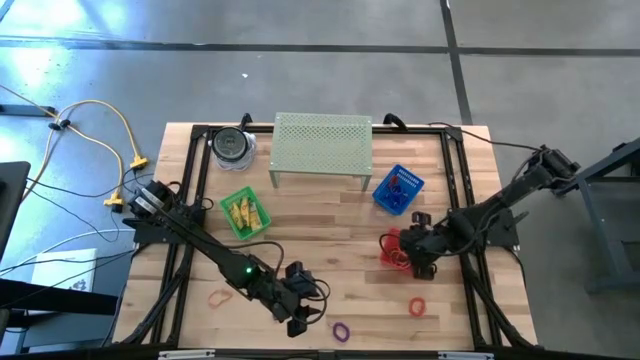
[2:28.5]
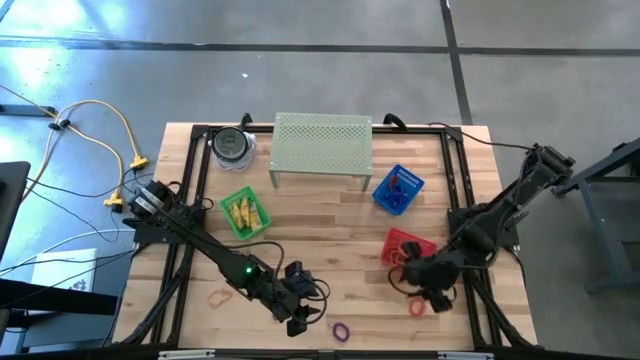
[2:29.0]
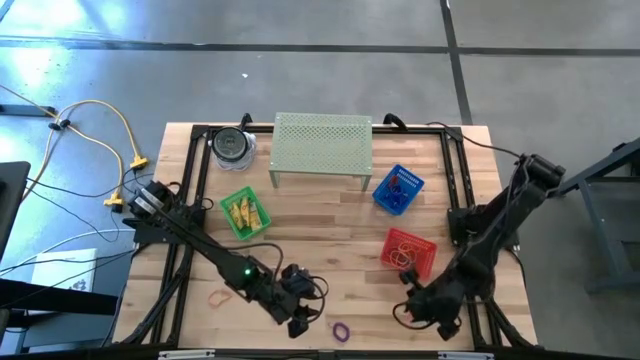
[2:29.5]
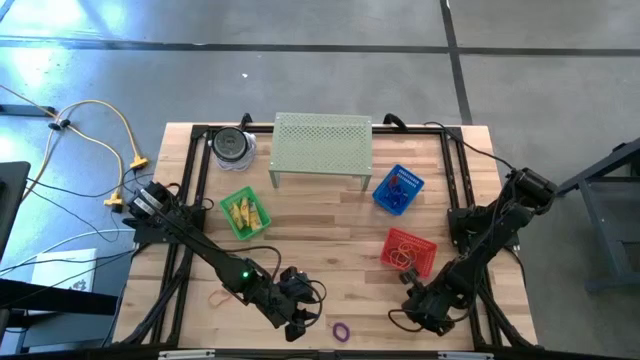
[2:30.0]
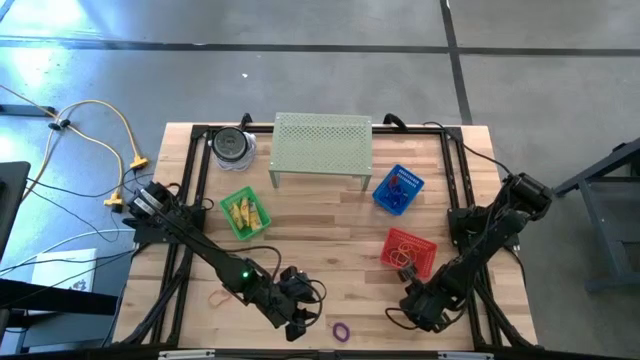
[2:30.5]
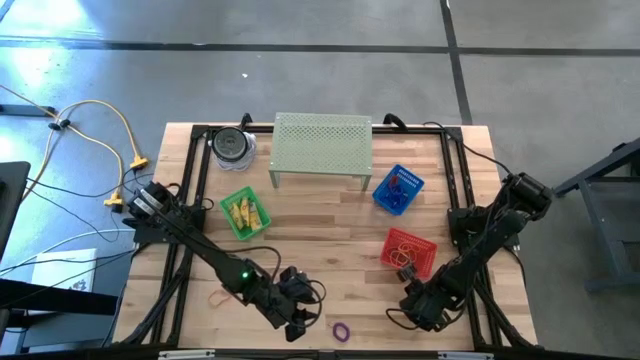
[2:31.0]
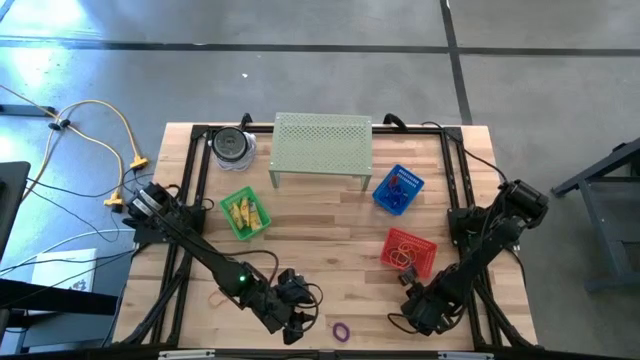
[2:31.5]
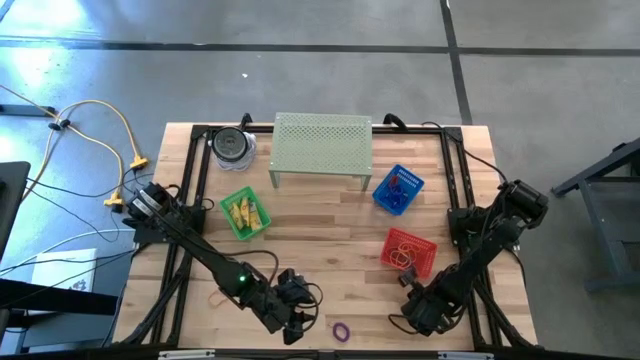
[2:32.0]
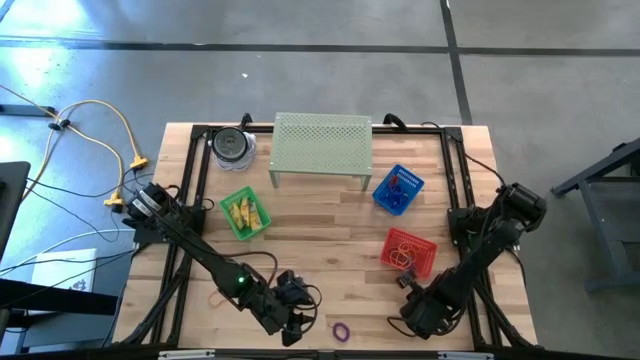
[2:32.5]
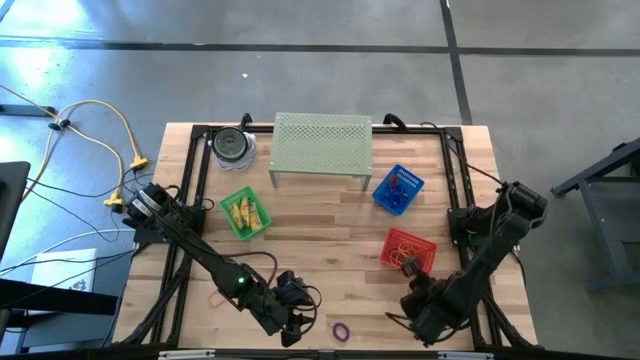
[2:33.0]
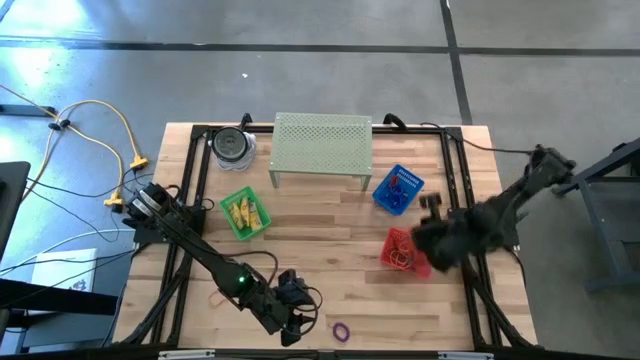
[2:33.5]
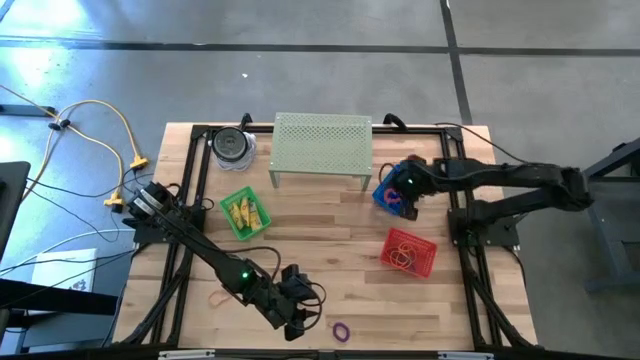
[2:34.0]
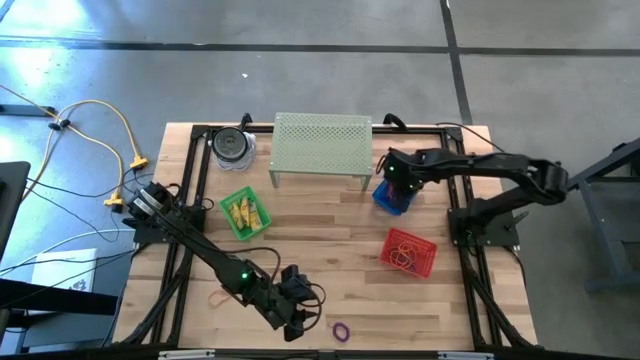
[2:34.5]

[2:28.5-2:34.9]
Task: Pick & Place Office Desk Supplies
Put the orange spring keychain into the blue basket

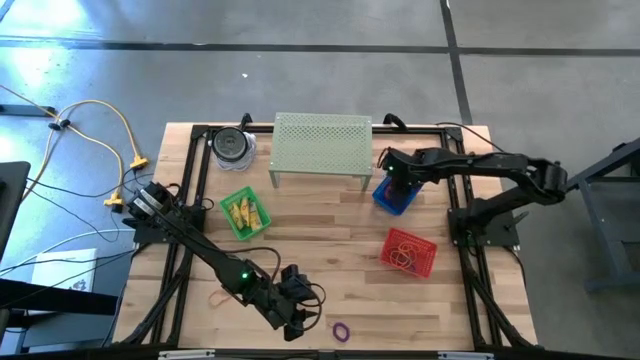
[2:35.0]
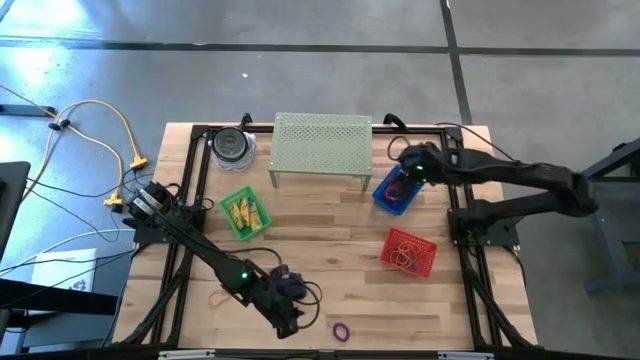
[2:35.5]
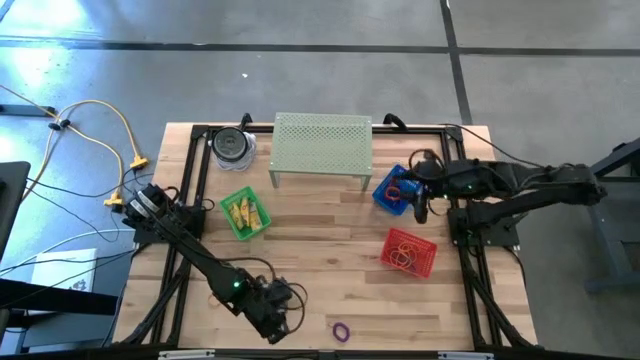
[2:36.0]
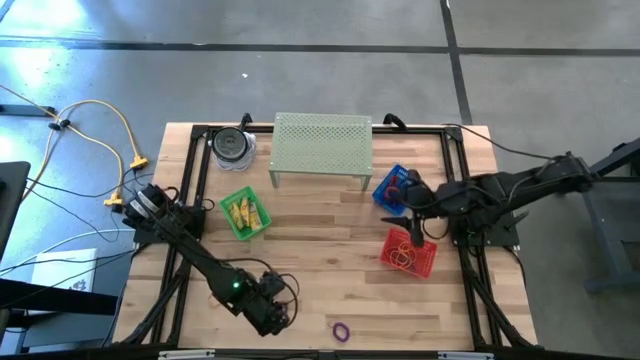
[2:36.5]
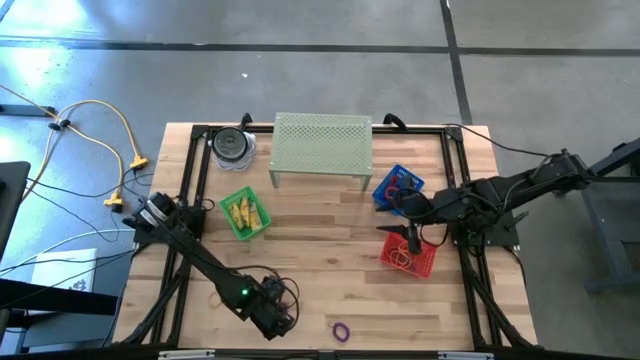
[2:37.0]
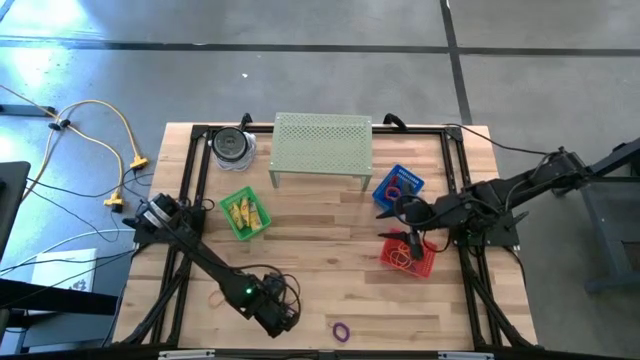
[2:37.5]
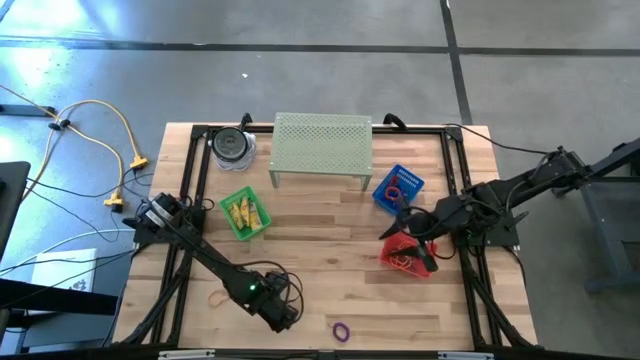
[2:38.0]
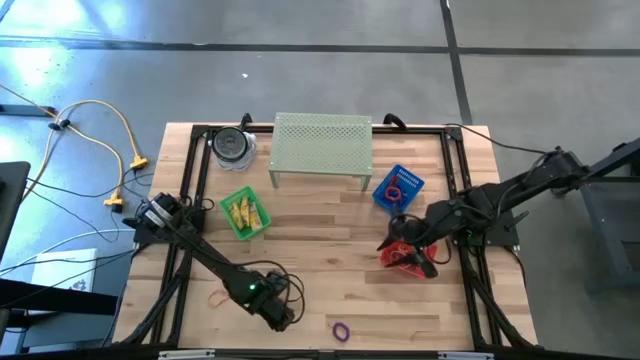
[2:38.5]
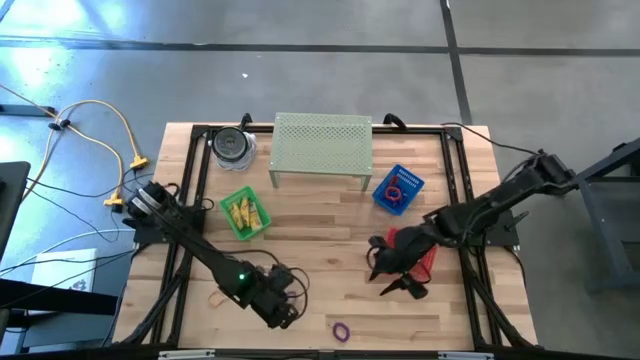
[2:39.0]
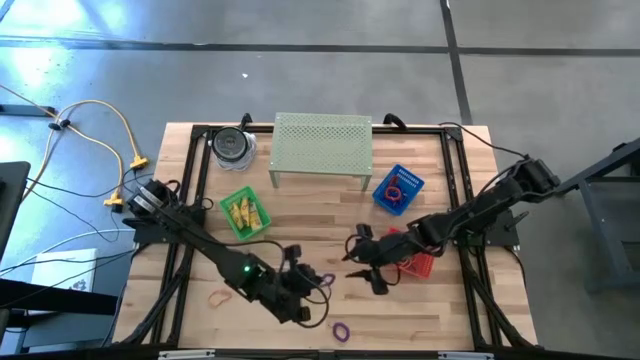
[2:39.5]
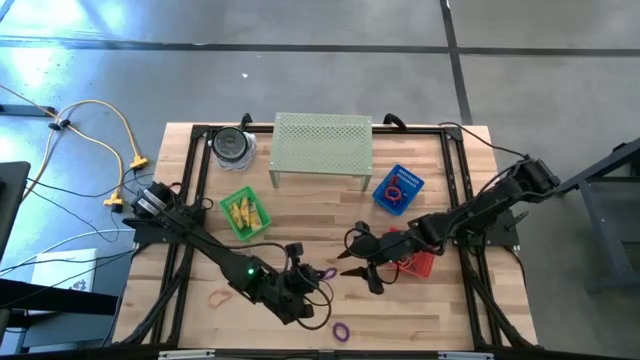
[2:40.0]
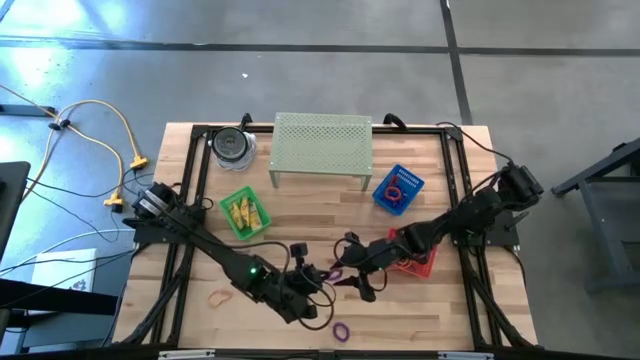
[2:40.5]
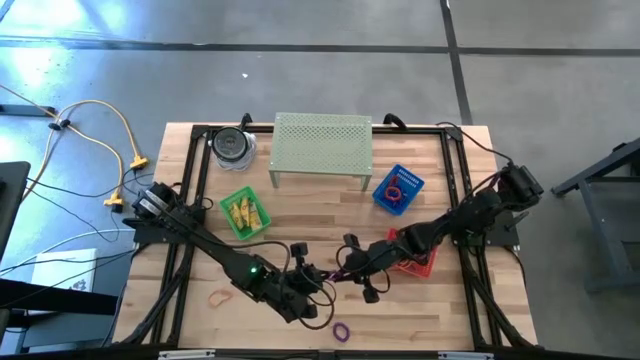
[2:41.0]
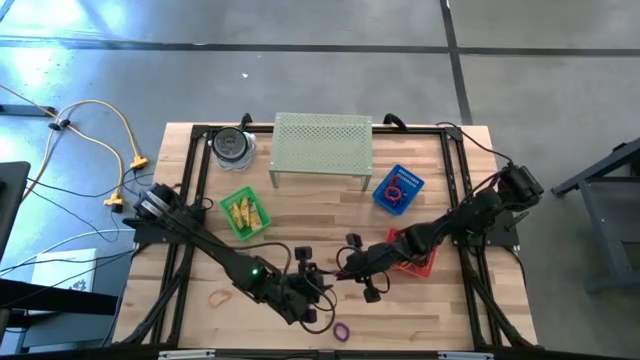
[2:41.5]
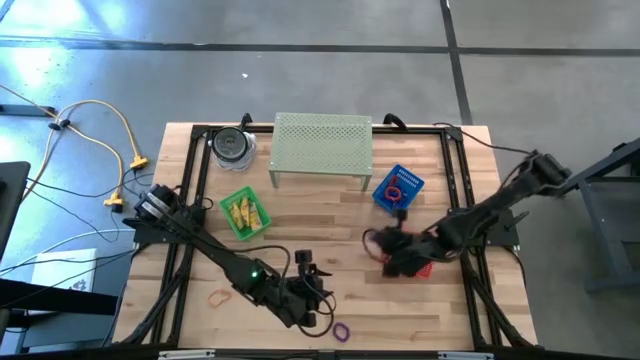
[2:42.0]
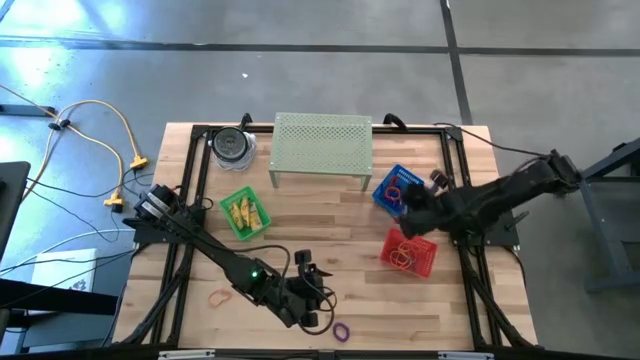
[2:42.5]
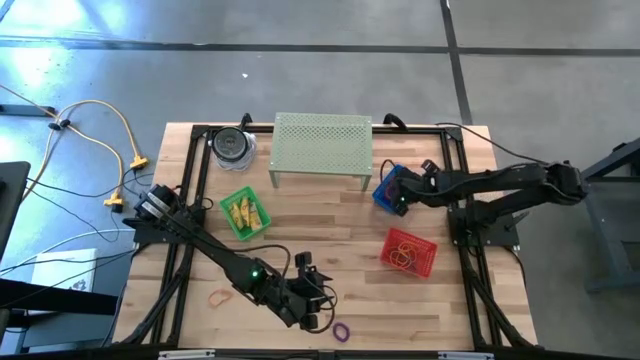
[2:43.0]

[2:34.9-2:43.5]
Put the violet spring keychain into the blue basket

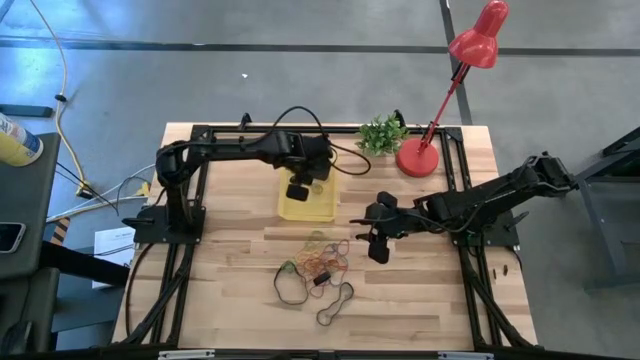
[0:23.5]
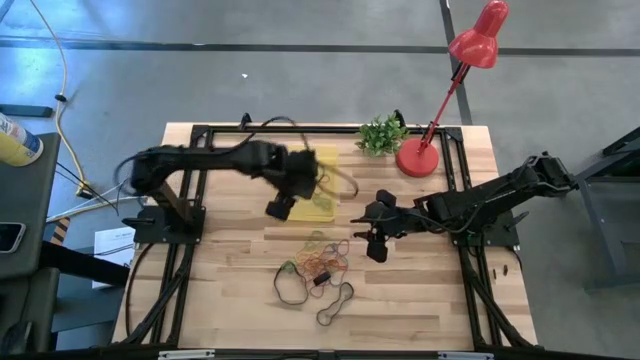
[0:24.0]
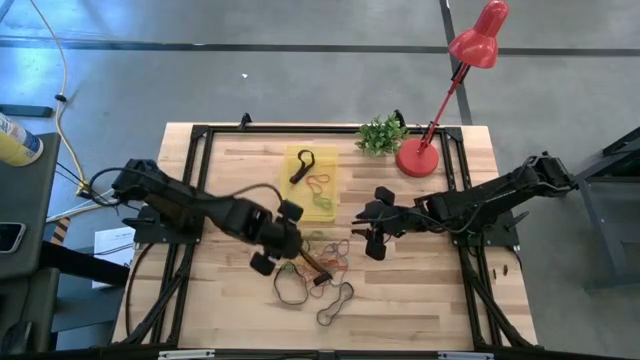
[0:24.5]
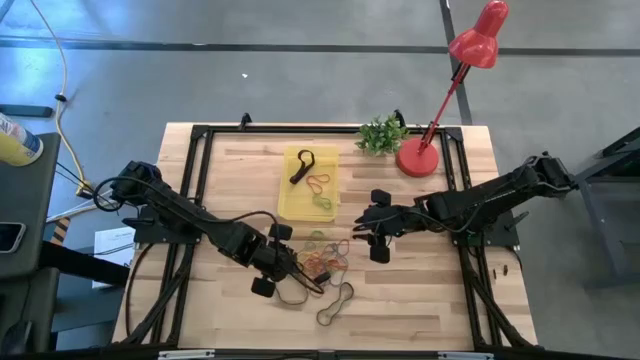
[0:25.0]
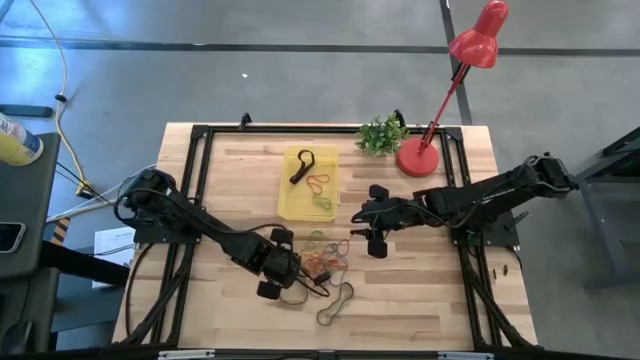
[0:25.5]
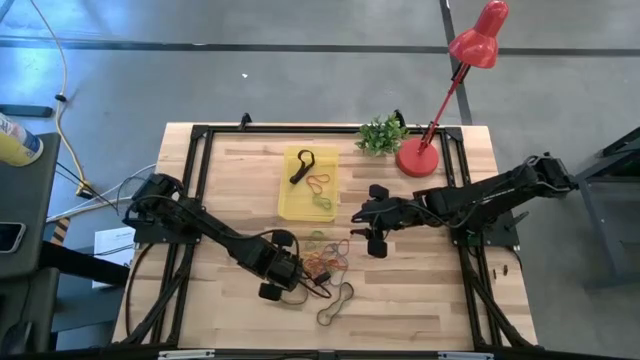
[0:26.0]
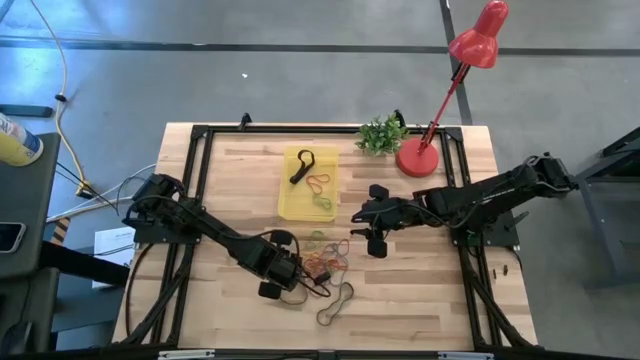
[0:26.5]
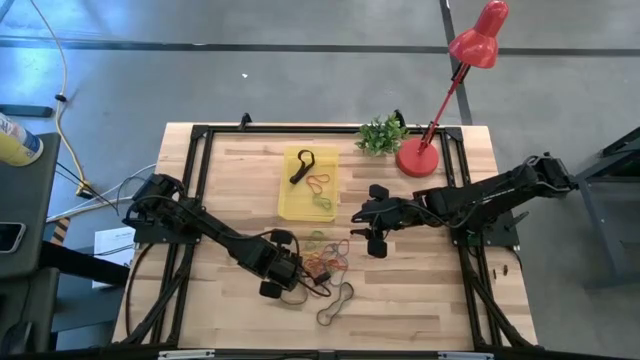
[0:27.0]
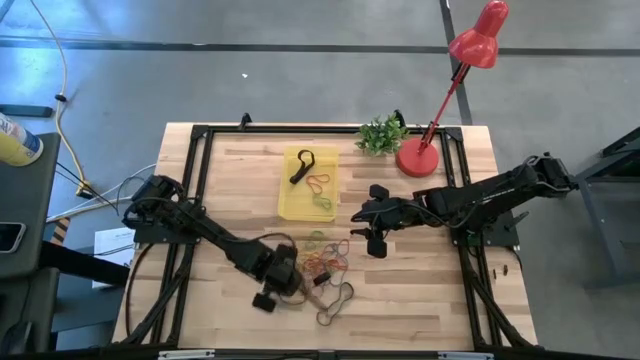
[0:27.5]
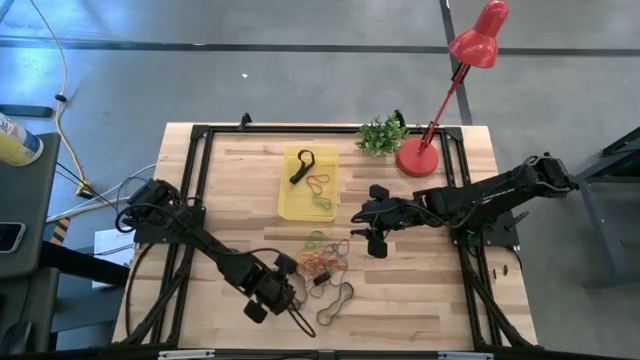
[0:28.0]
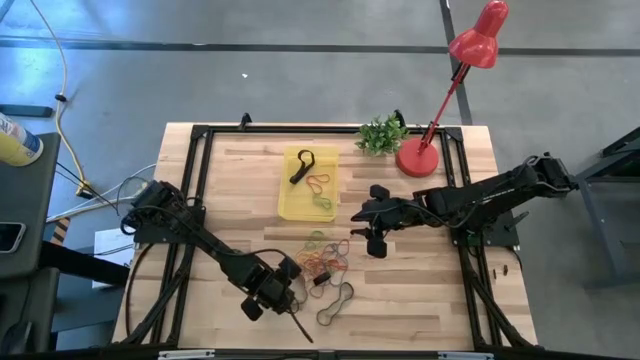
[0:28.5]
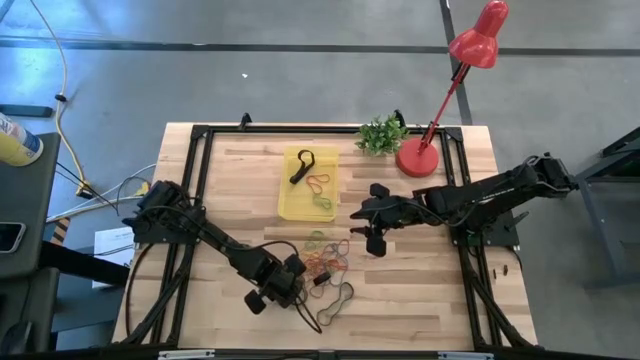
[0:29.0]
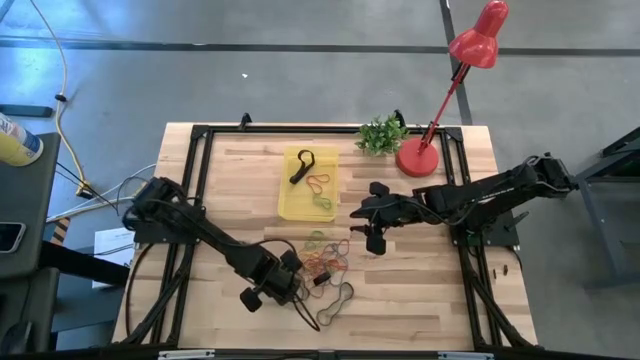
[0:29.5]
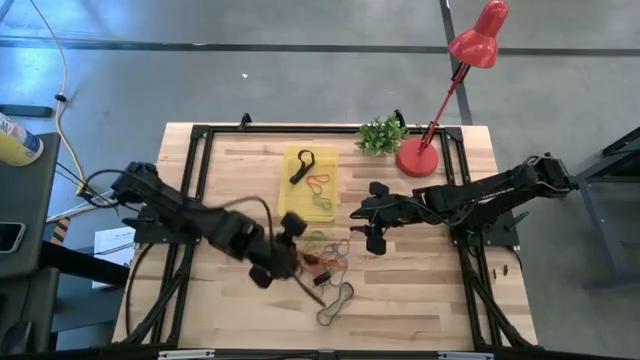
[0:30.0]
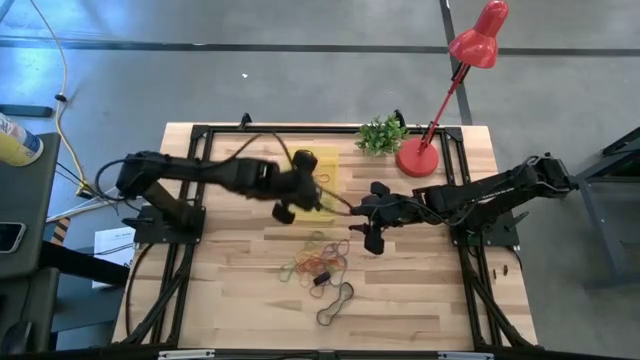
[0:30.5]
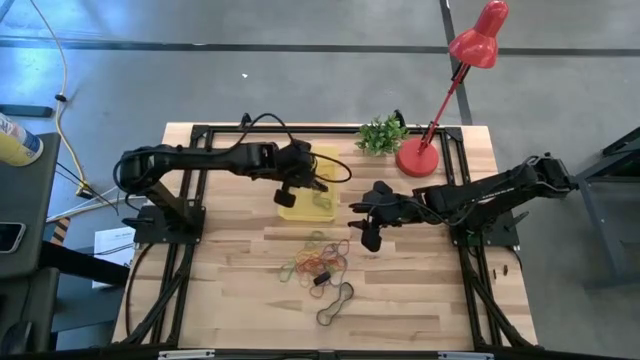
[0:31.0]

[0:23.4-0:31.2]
Task: Pick and place rubber bands into bin
Put the black rubber band into the yellow bin
